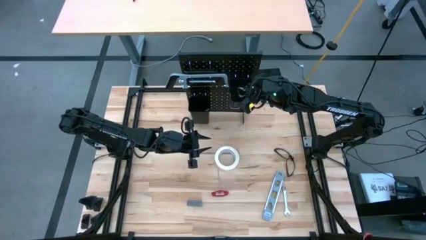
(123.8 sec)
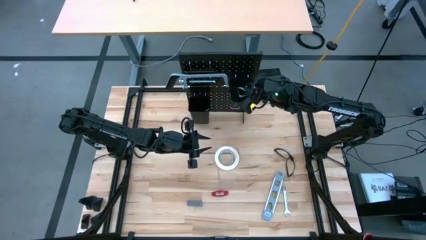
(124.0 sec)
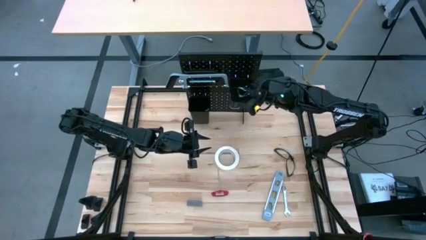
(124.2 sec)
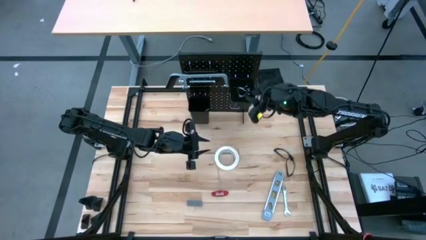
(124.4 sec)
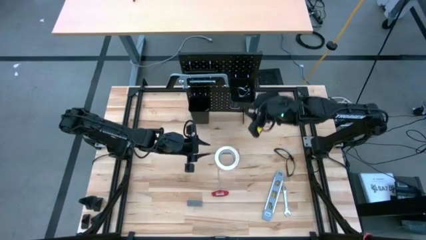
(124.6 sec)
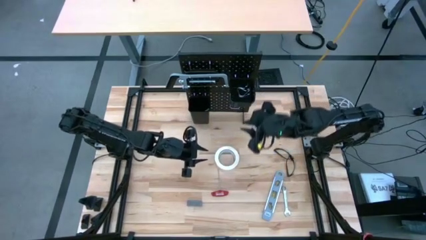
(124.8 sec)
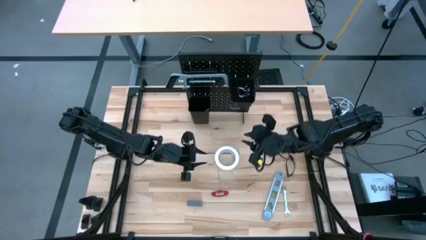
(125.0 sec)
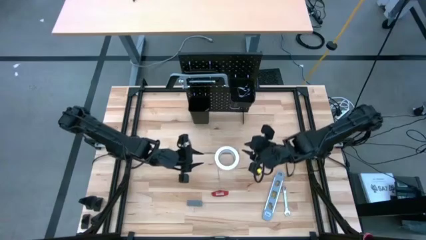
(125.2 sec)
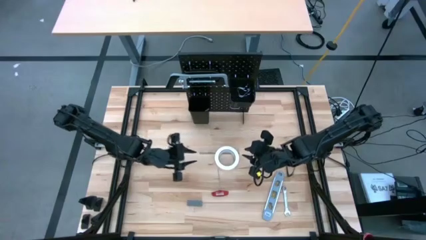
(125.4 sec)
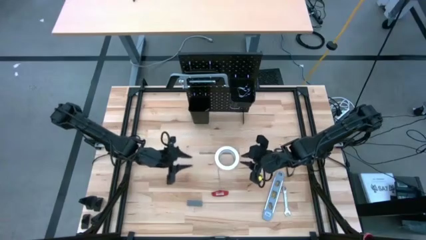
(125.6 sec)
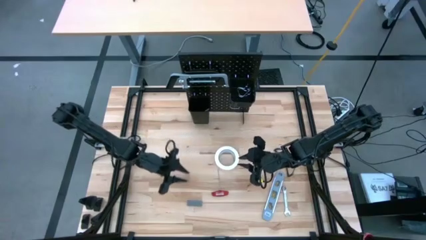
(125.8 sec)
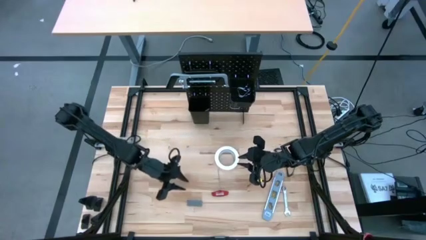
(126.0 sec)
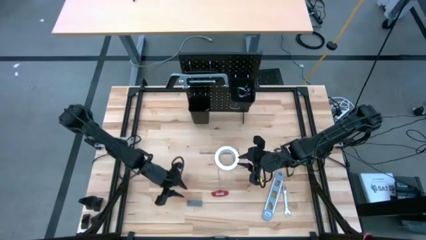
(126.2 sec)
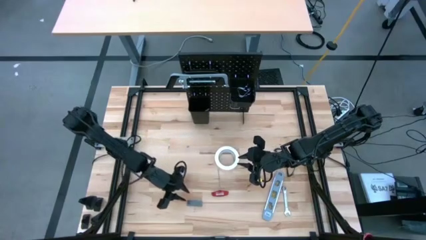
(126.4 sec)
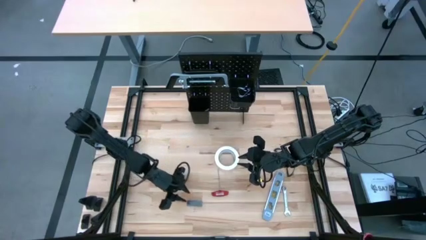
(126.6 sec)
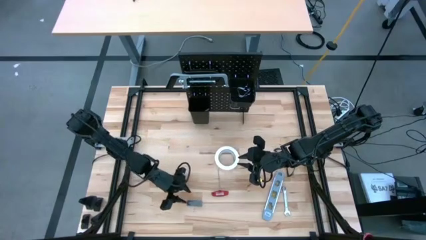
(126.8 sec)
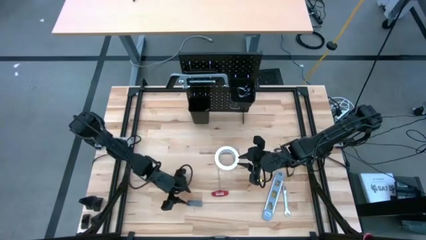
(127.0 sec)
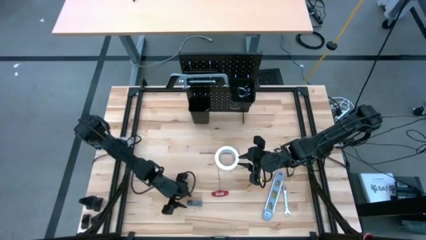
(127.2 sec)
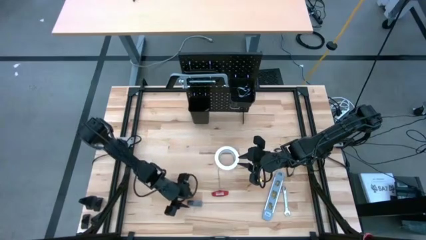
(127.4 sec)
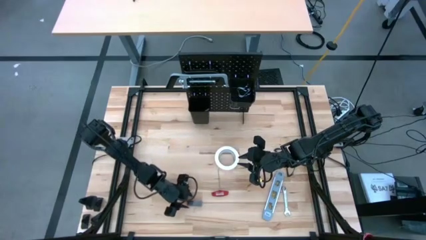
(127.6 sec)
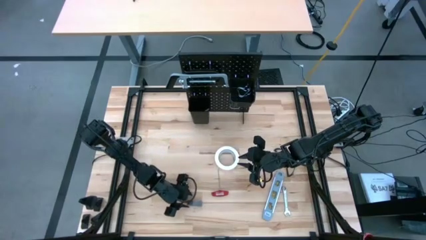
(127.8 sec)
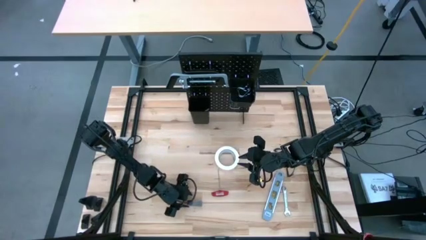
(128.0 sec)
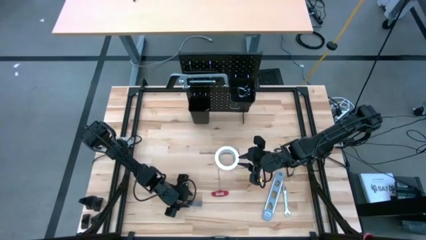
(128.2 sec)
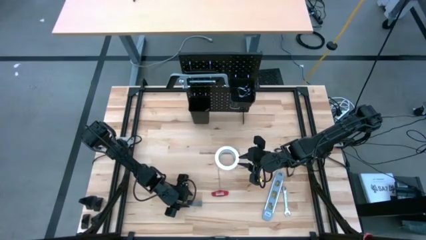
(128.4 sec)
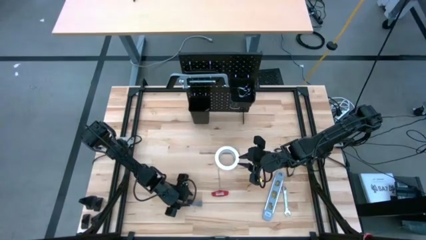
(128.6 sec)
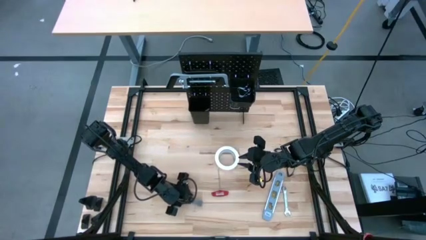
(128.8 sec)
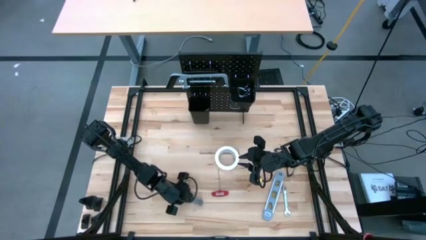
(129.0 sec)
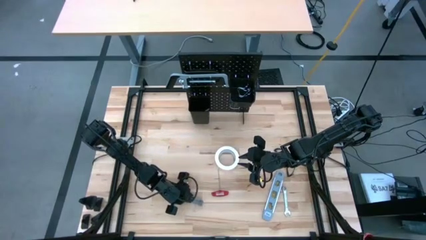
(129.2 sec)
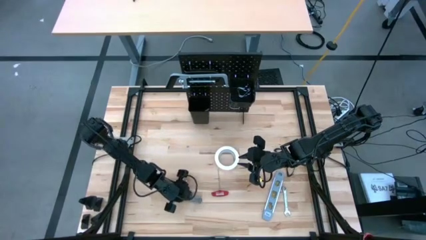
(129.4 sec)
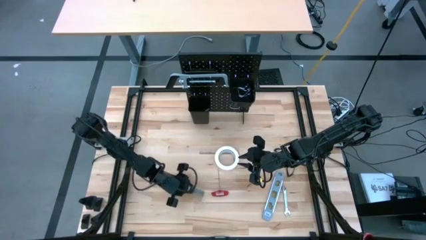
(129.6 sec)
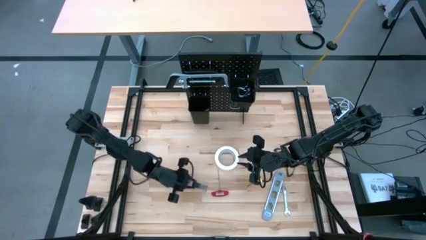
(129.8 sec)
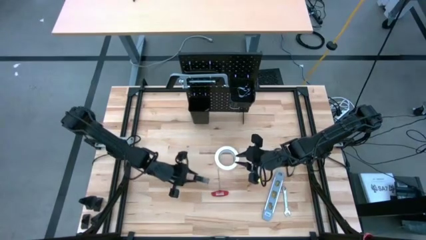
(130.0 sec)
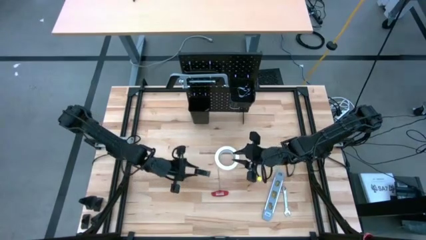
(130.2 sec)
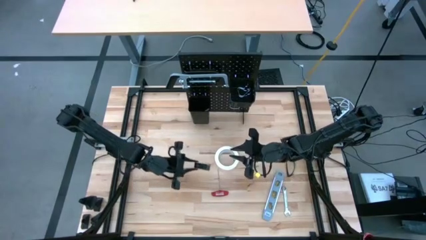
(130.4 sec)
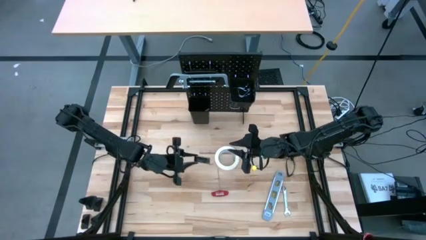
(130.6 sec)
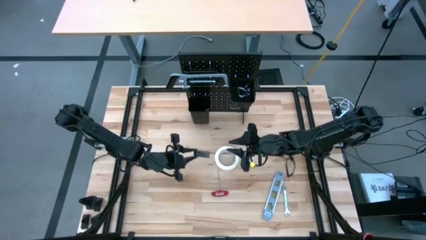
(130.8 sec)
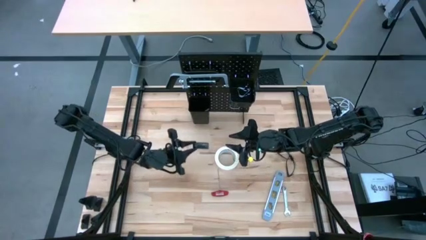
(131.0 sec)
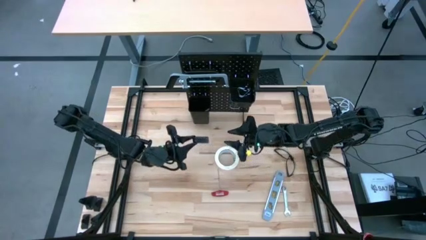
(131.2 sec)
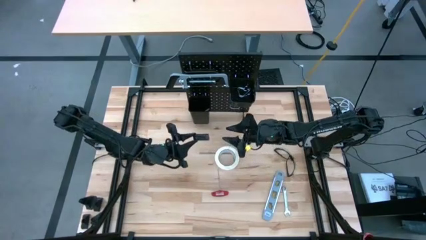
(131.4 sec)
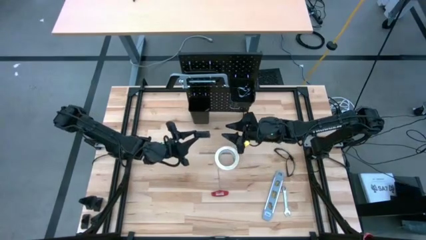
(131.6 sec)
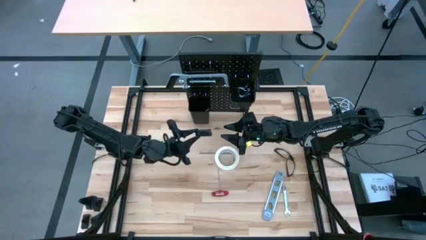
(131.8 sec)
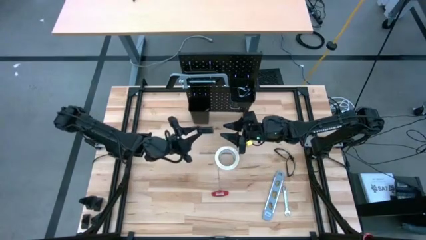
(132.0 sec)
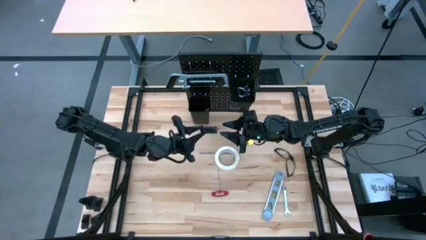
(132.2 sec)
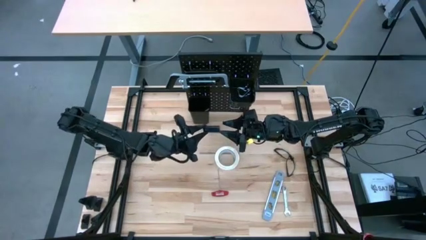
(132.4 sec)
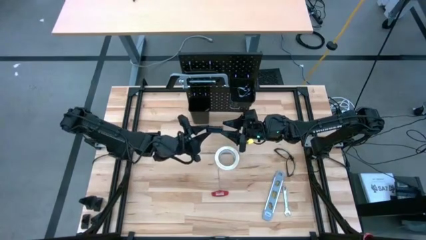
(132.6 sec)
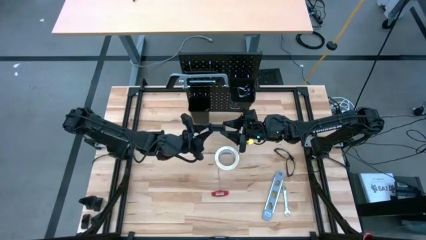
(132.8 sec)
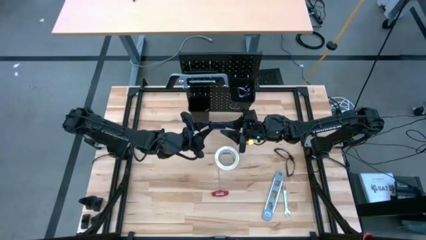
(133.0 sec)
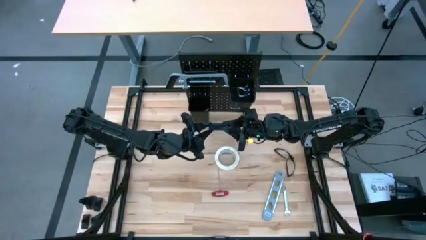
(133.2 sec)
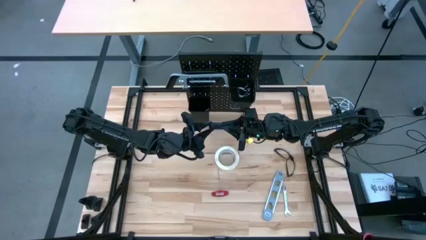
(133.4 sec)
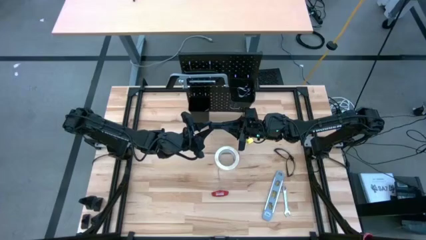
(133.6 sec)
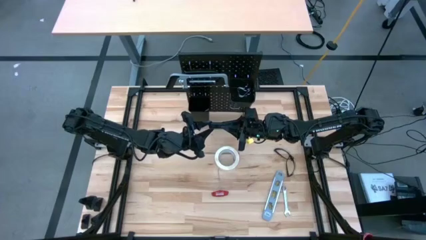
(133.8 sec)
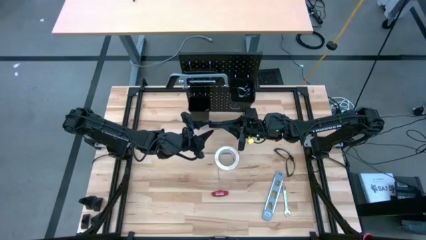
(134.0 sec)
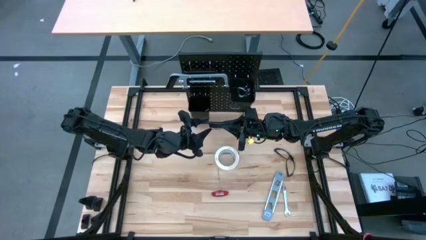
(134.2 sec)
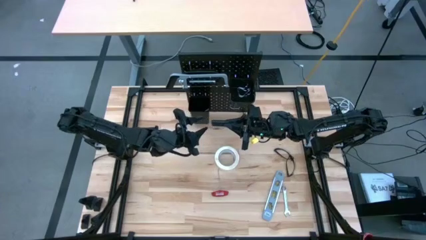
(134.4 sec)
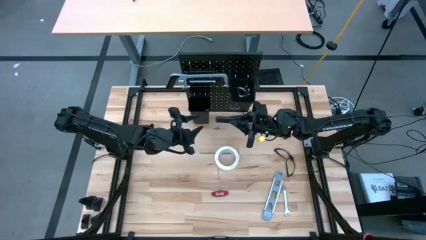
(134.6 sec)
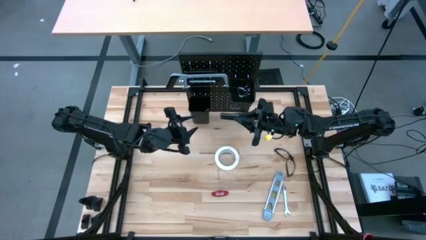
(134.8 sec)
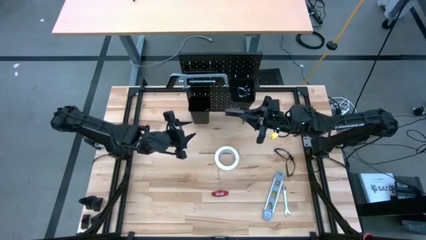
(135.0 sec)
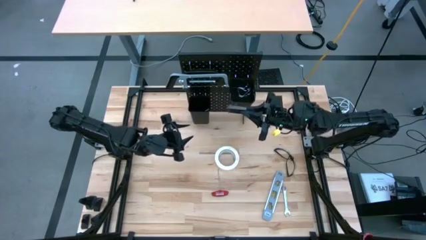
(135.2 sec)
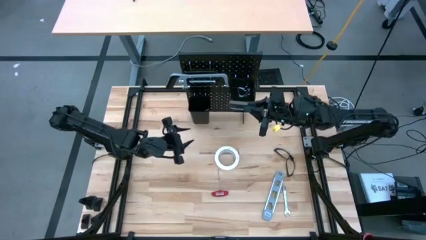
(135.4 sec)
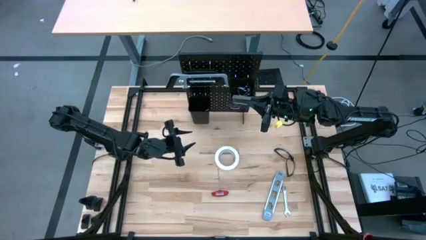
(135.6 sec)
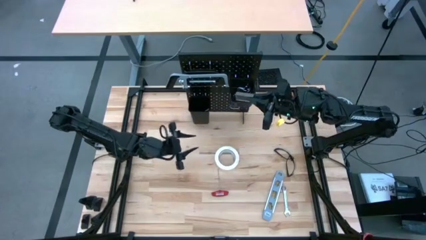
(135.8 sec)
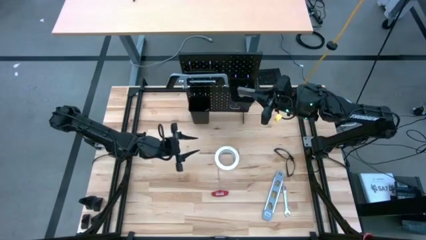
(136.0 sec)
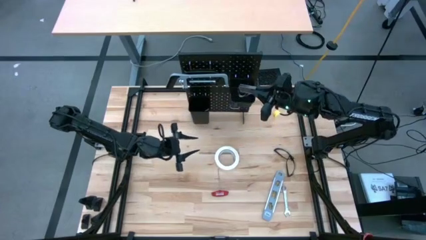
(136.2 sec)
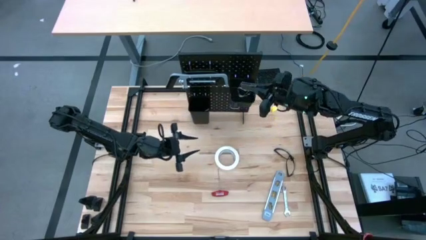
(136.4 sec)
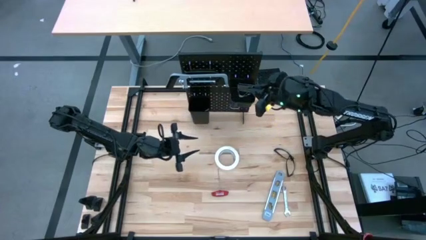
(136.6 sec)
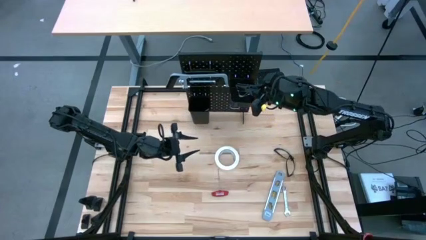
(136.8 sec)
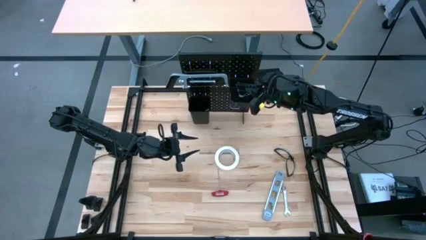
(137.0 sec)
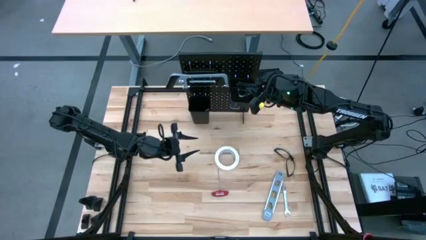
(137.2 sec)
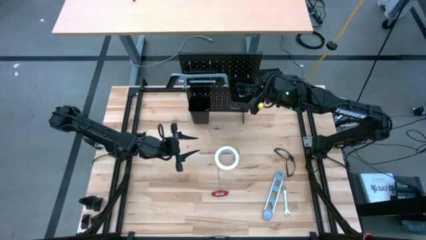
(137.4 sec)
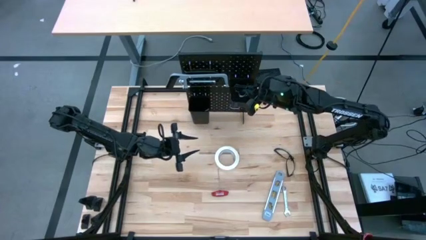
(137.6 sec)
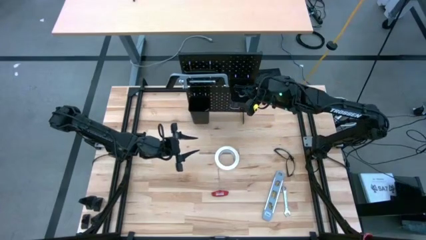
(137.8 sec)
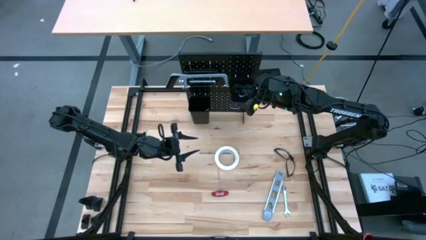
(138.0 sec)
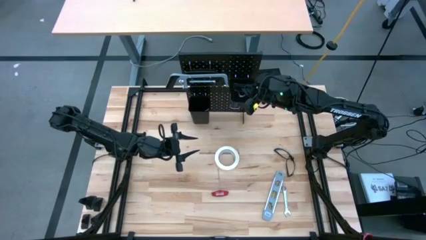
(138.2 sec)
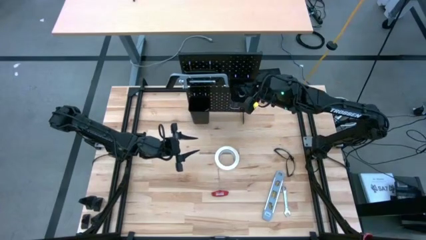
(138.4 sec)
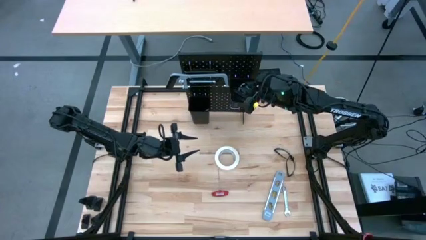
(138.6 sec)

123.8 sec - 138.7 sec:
Task: Hang tools onto peg board
Put small black level into the right black tool bin

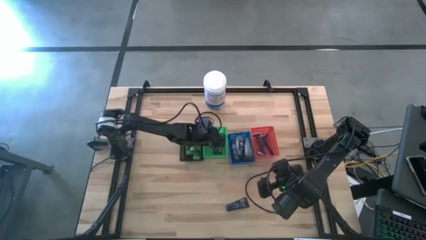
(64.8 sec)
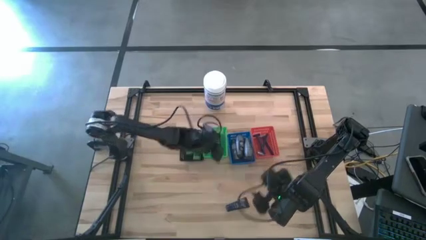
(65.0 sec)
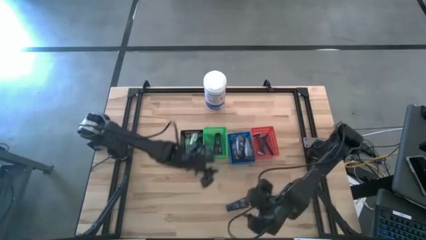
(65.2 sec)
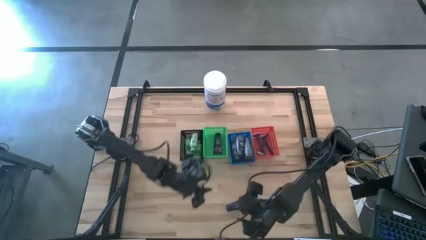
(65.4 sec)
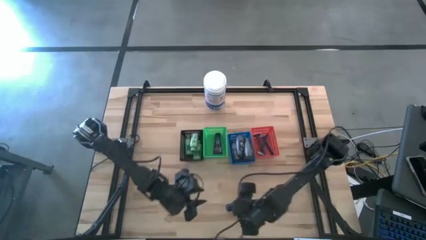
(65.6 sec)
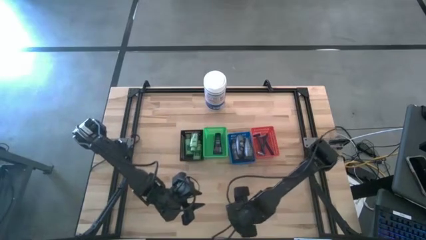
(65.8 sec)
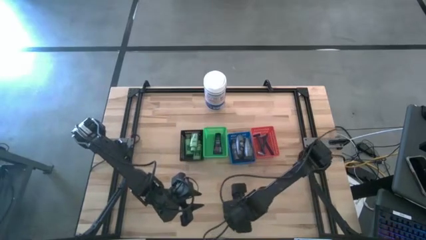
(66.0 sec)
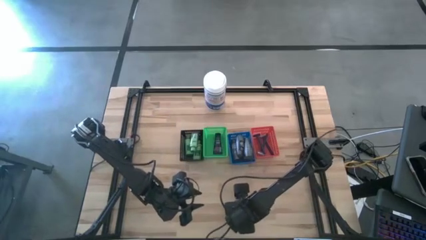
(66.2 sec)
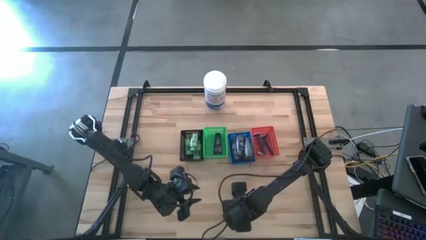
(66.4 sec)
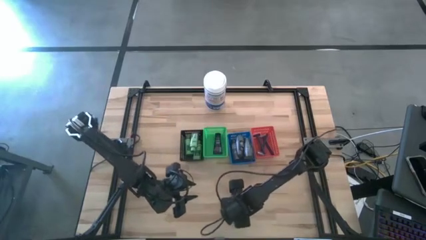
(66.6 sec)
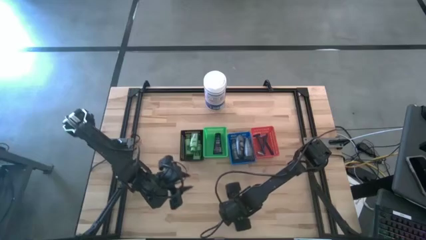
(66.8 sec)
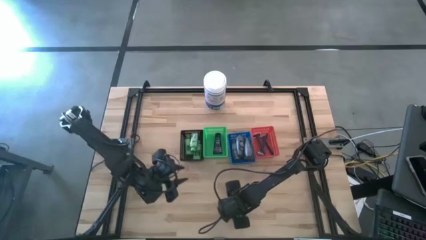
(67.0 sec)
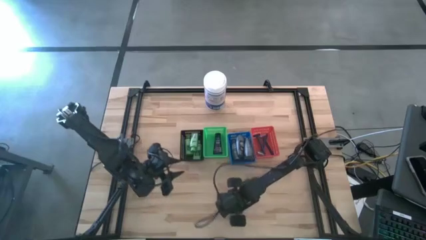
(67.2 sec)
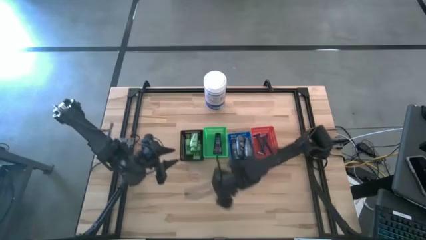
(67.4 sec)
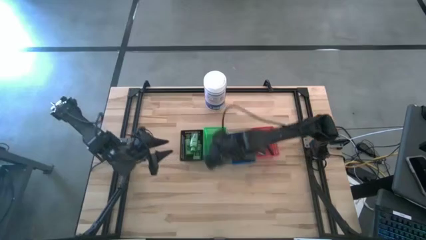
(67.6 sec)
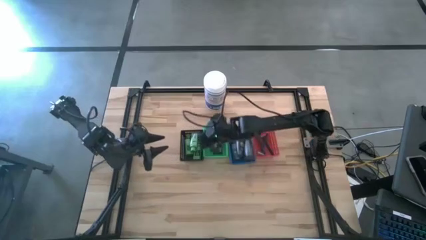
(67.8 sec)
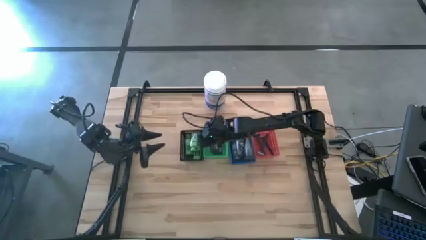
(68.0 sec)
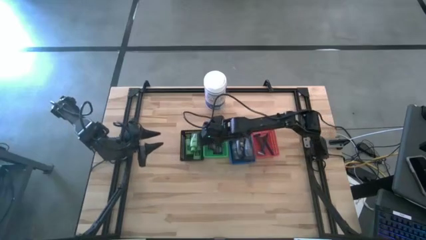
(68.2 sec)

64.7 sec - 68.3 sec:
Task: Pick & Place Travel size toiletries
Put the shave cream into the green basket
